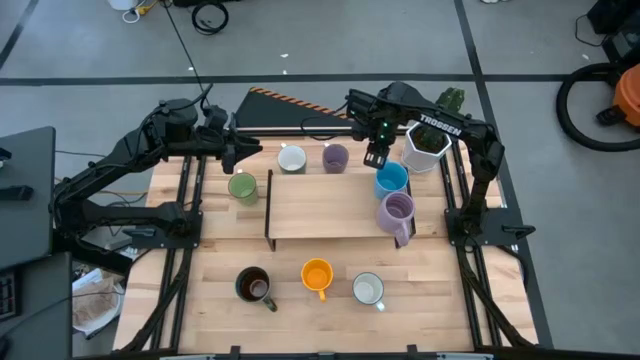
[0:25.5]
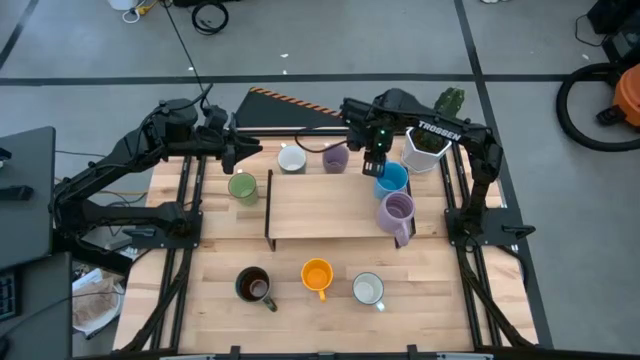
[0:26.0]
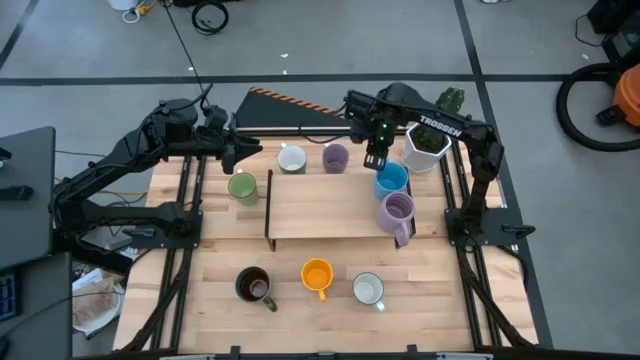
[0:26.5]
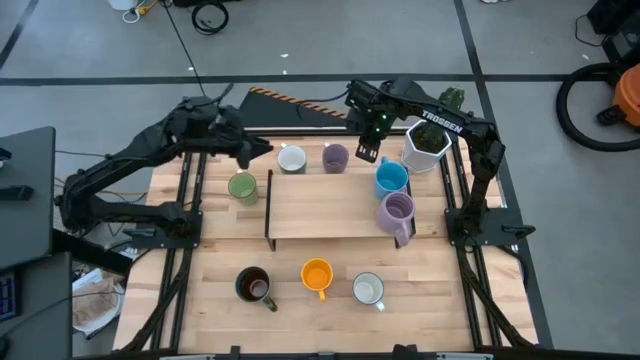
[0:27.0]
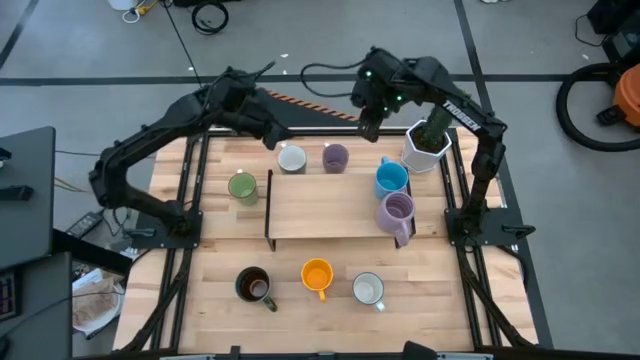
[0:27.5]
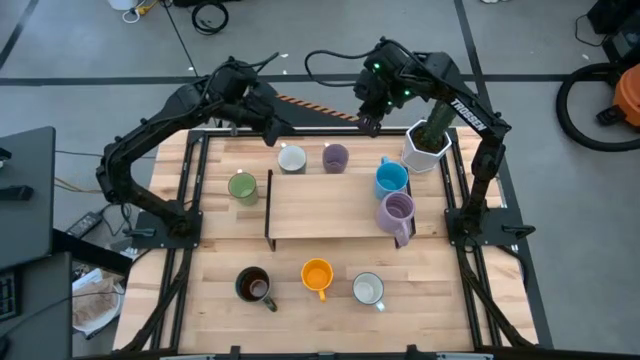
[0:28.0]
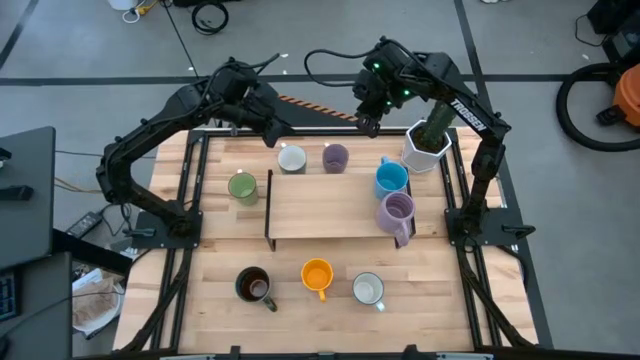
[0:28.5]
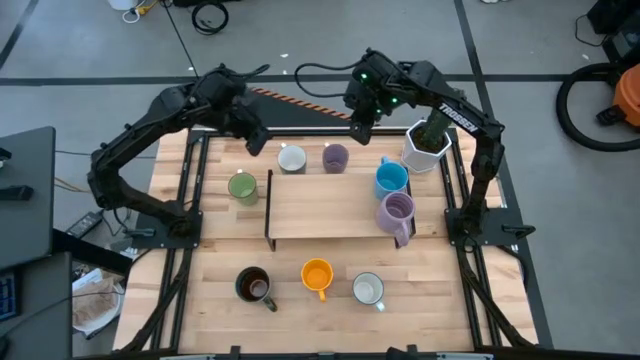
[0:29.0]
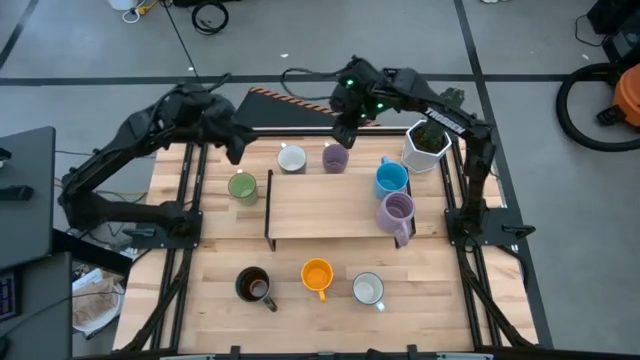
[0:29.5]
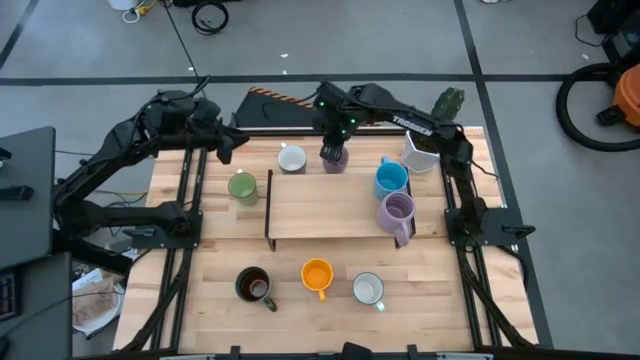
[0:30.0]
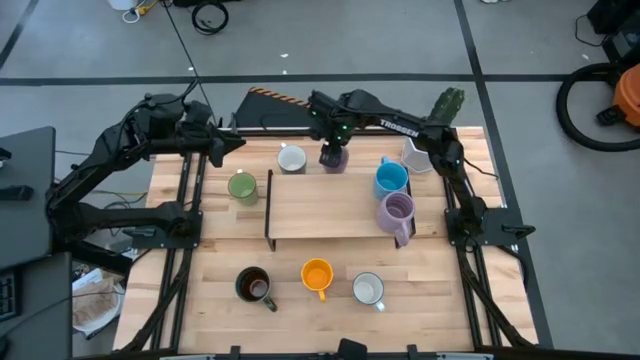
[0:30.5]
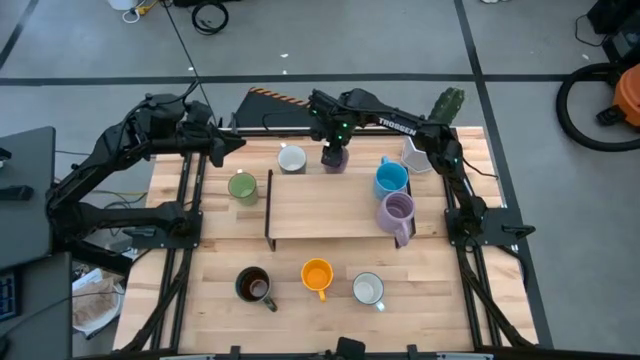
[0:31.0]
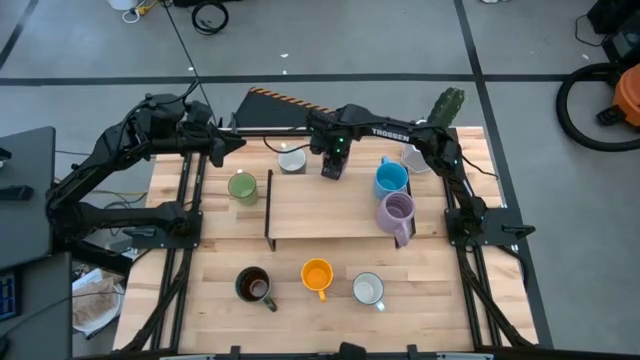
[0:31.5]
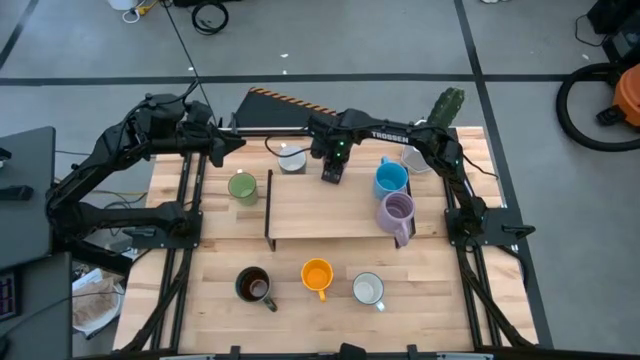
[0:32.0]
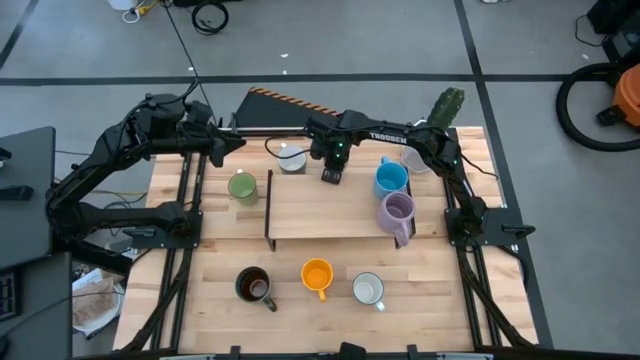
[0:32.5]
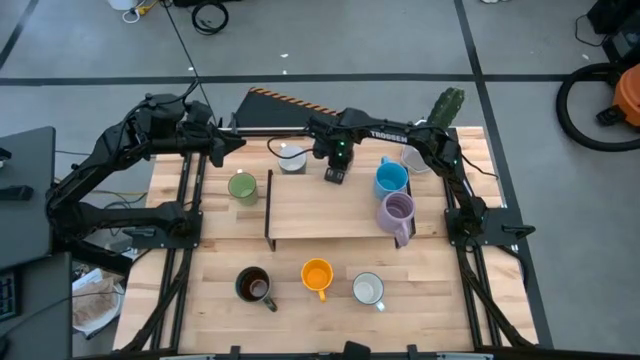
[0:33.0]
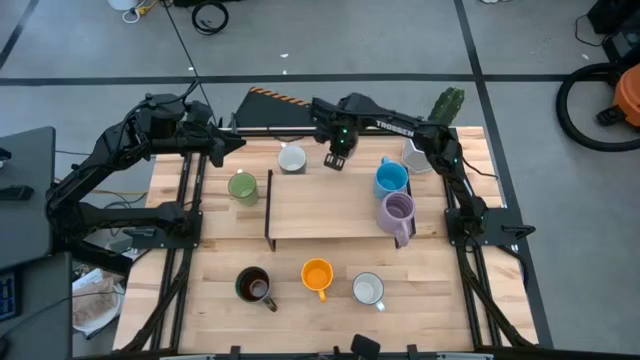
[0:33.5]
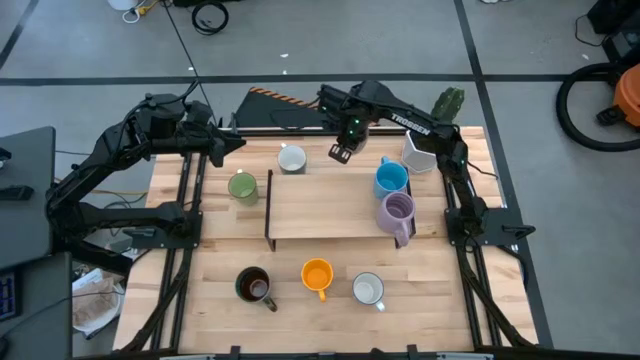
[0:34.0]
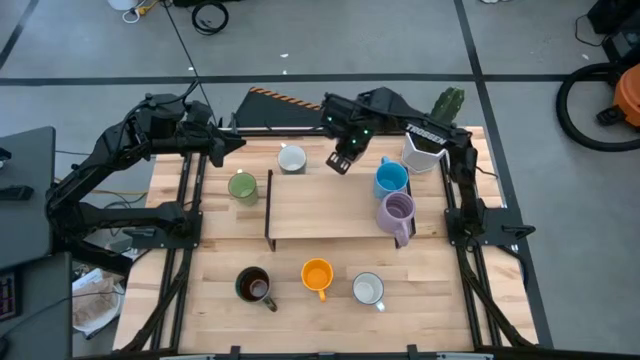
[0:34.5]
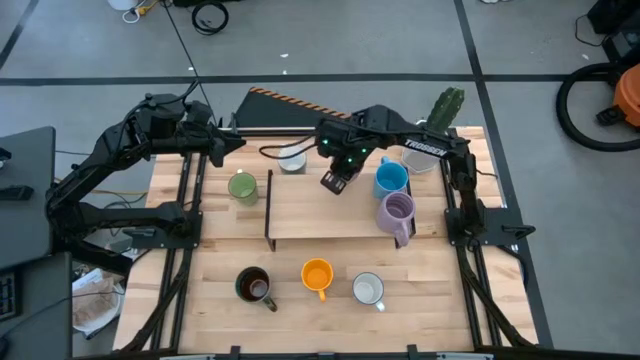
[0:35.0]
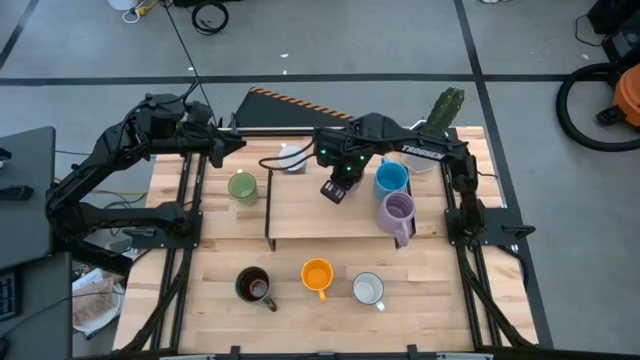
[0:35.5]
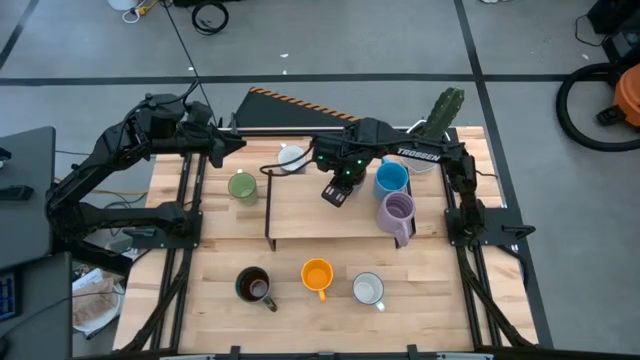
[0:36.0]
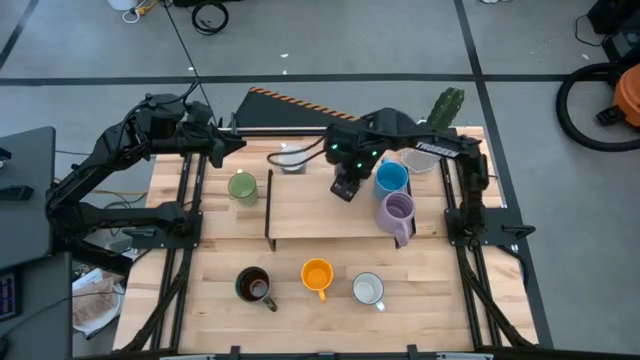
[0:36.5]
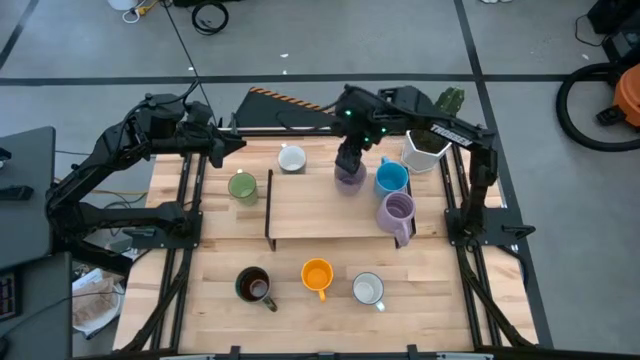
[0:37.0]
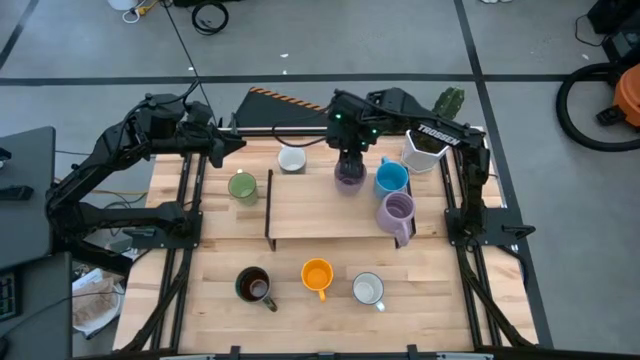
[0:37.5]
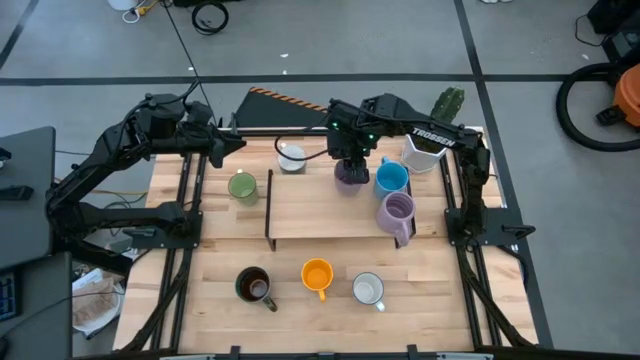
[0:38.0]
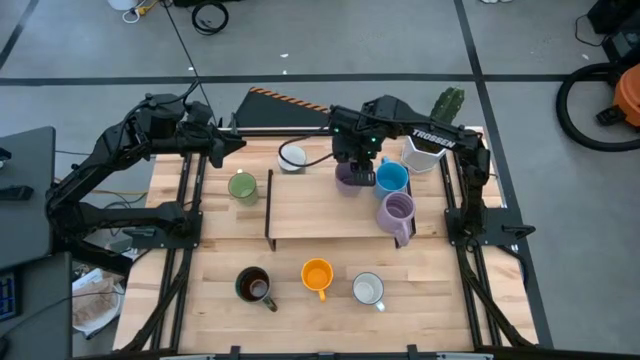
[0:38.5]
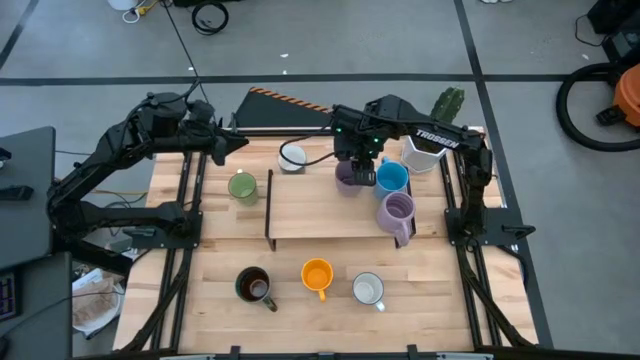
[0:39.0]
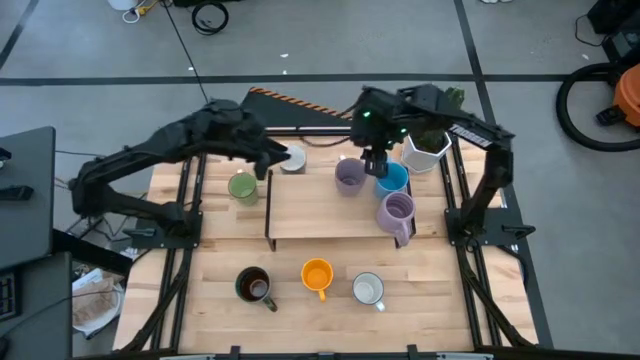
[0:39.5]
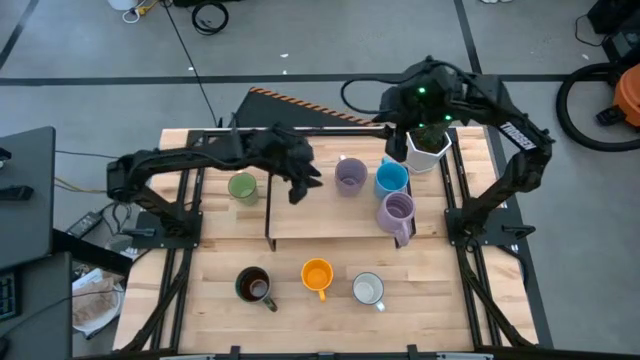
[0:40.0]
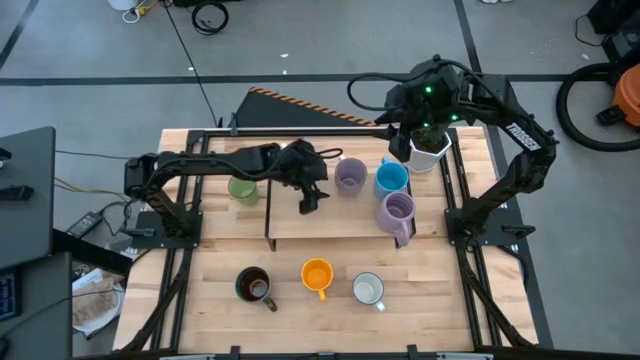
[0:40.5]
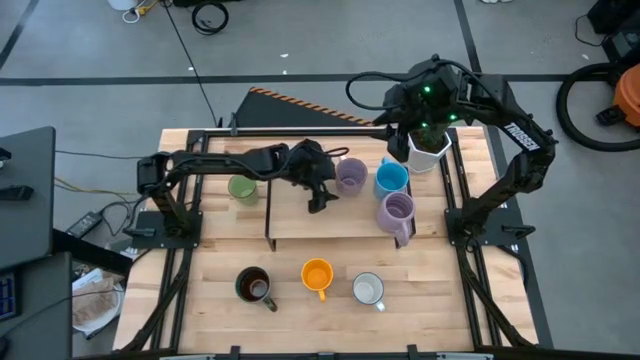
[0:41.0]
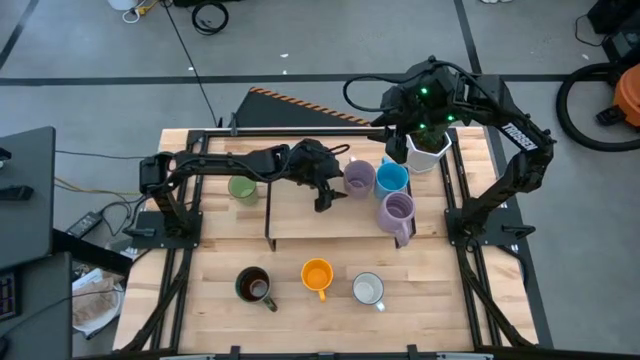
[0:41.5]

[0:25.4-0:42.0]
Task: Place coffee mugs
Put the violet mug on the shelf

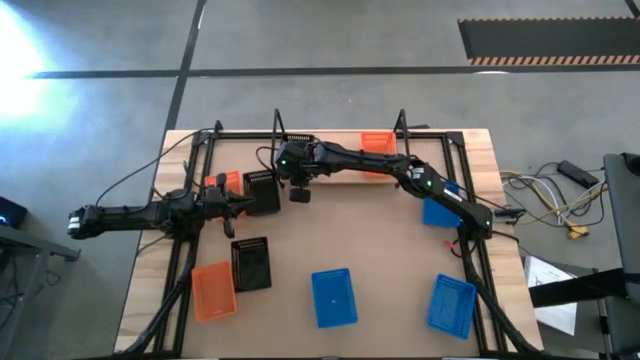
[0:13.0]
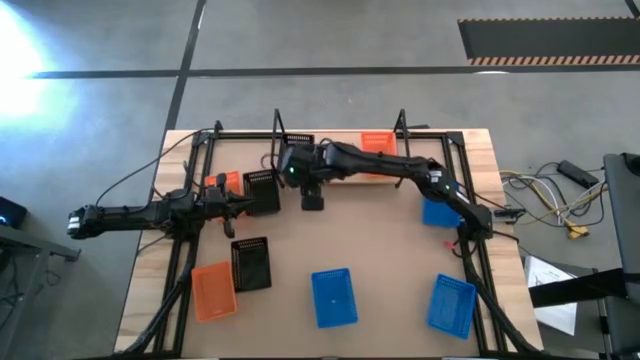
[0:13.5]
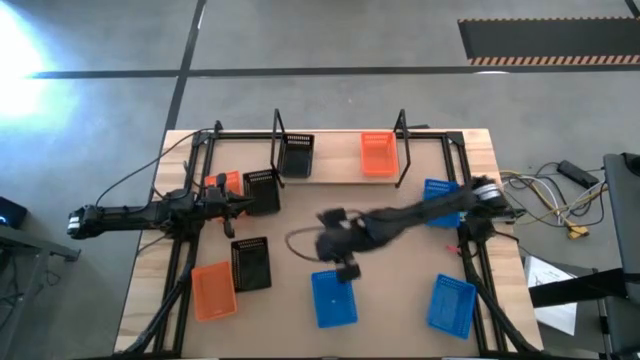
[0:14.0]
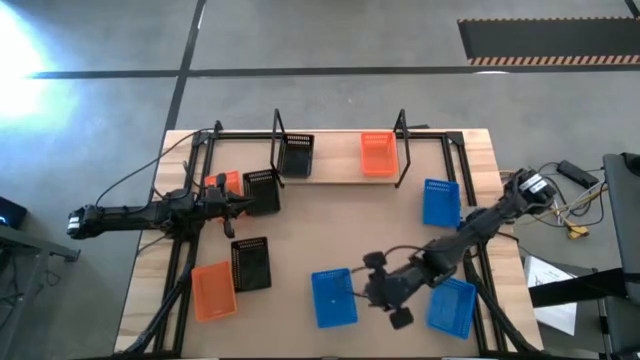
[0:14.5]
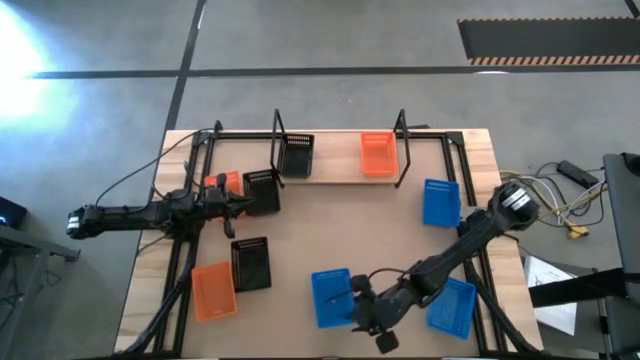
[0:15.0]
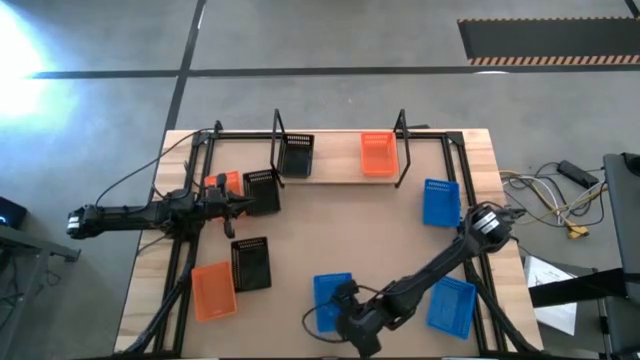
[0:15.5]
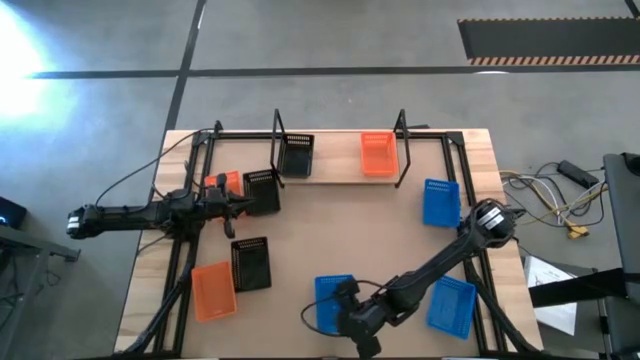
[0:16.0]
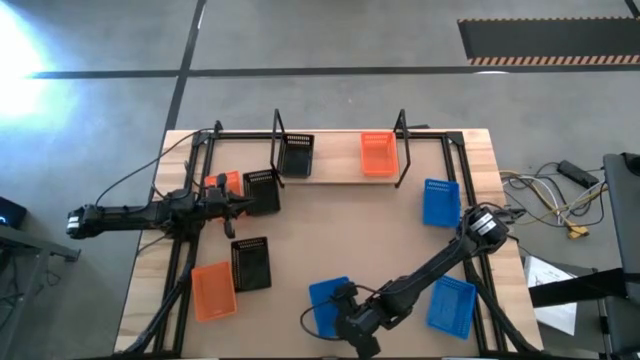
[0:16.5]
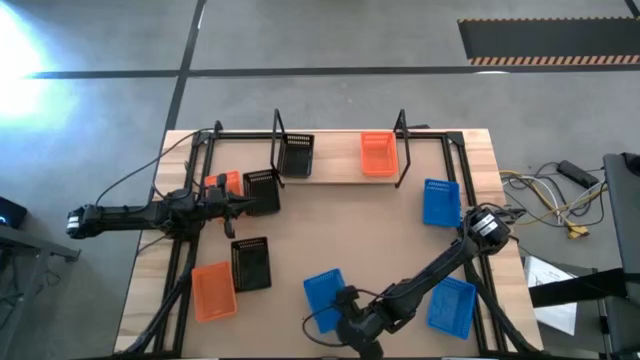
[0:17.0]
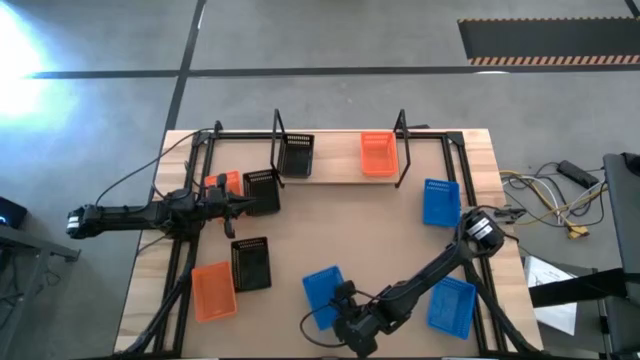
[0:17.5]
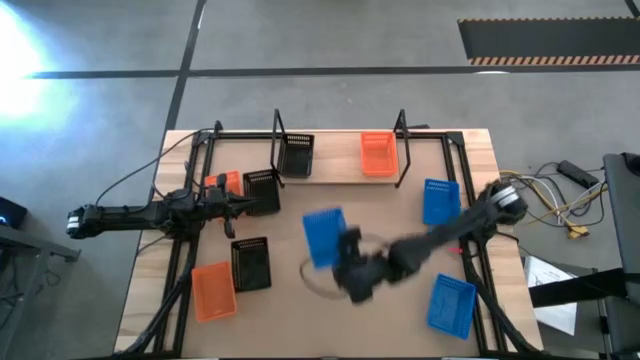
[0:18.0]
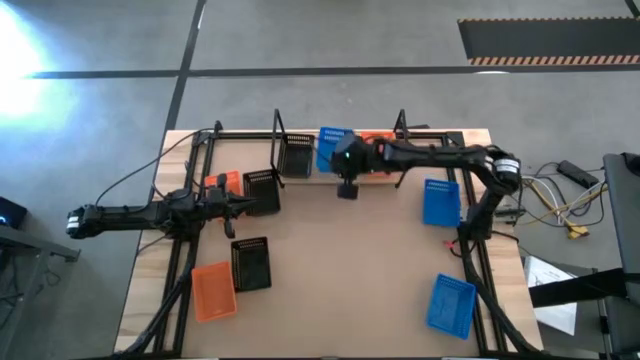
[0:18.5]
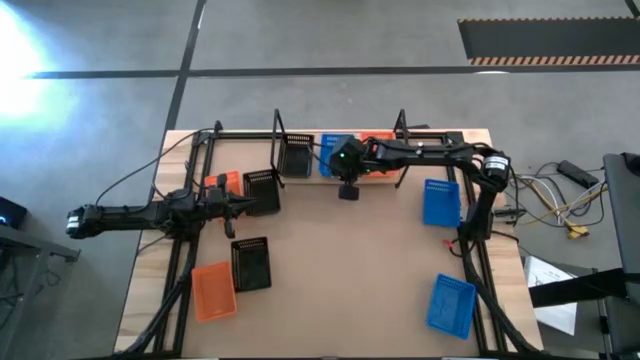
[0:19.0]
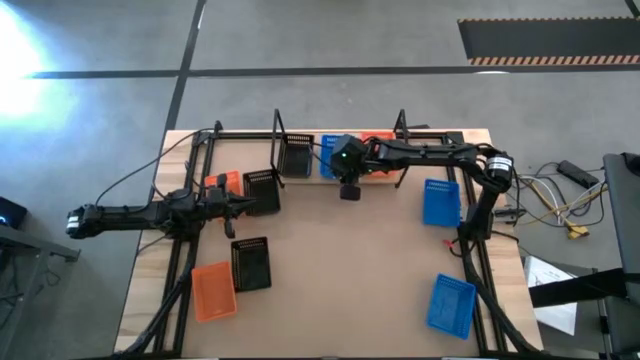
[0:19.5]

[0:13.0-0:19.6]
Task: Stack baskets on shelf by color
Put the bottom left blue bin on the shelf
